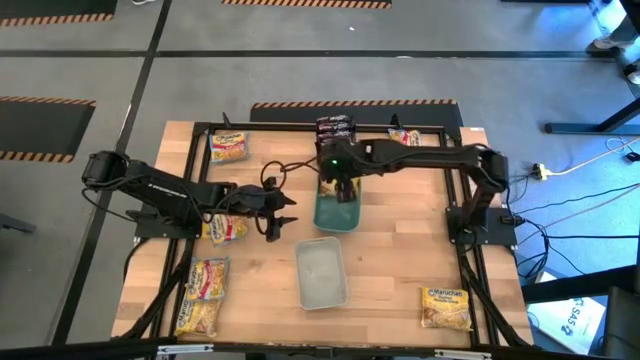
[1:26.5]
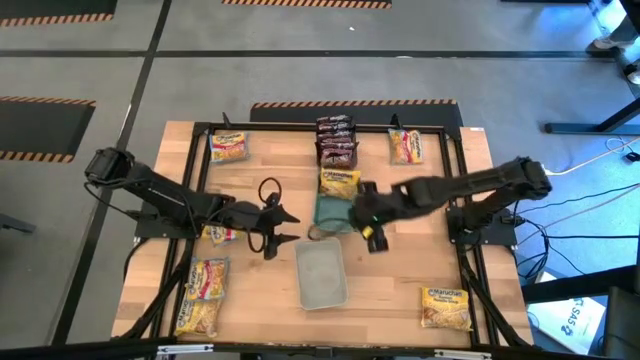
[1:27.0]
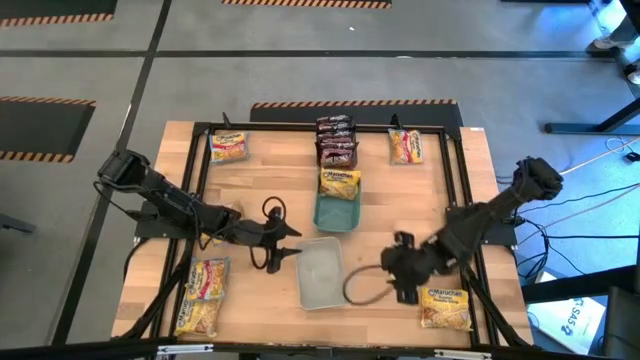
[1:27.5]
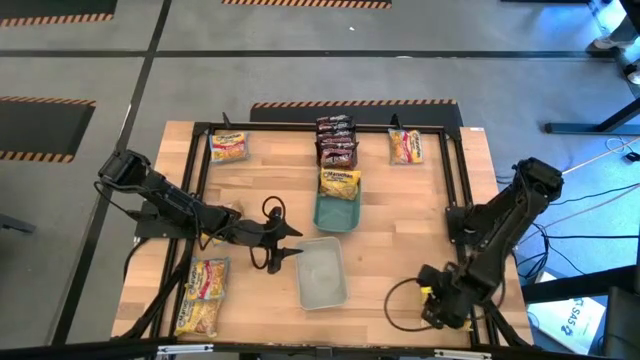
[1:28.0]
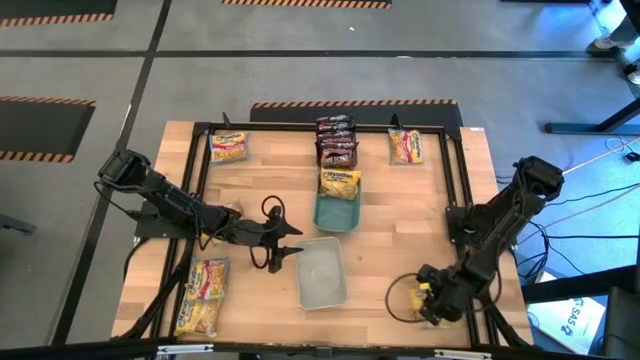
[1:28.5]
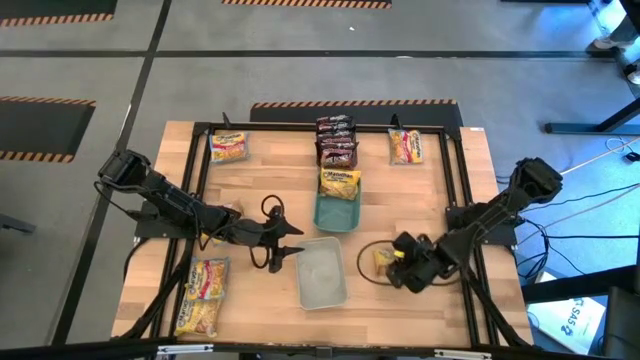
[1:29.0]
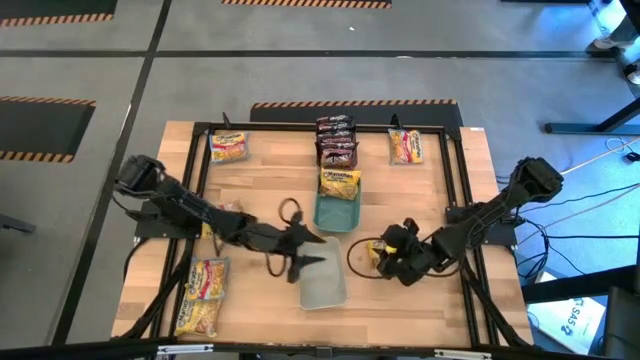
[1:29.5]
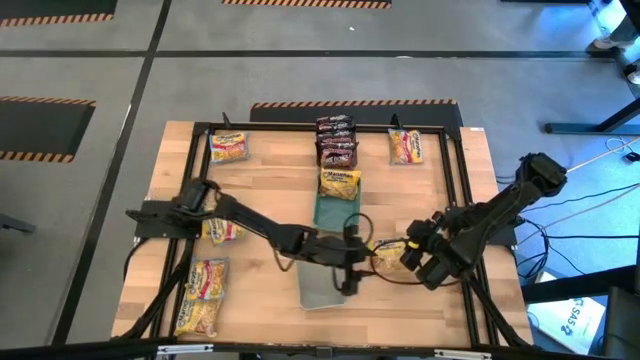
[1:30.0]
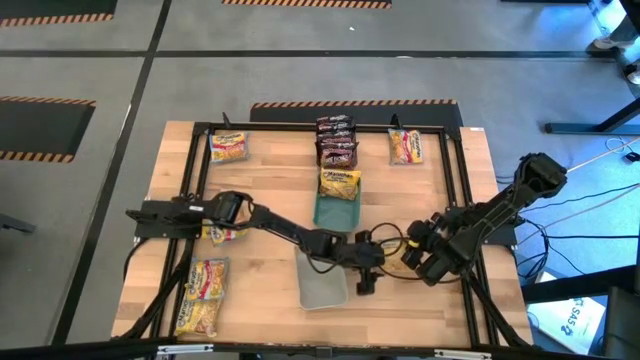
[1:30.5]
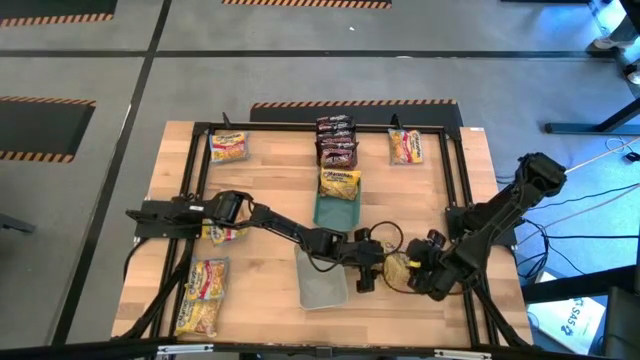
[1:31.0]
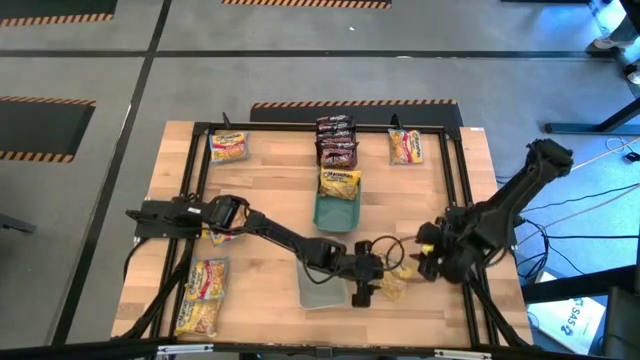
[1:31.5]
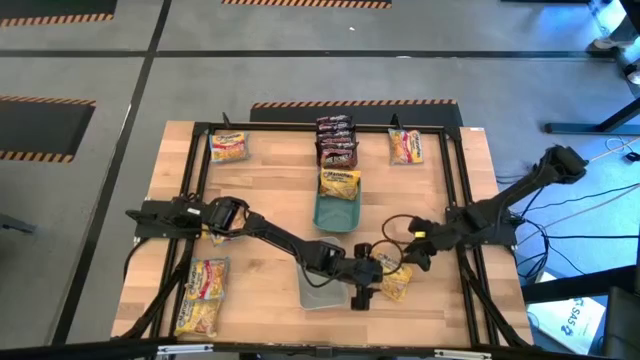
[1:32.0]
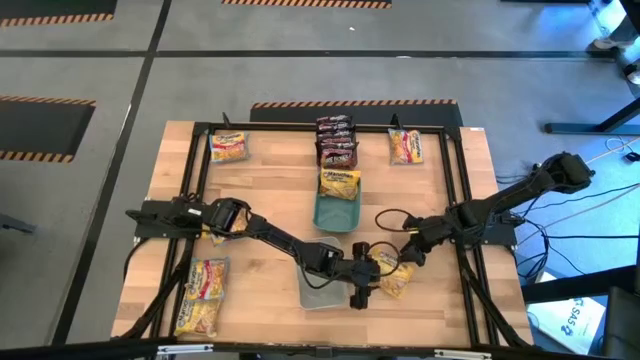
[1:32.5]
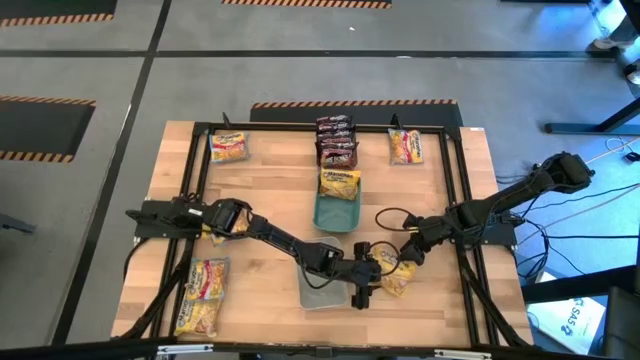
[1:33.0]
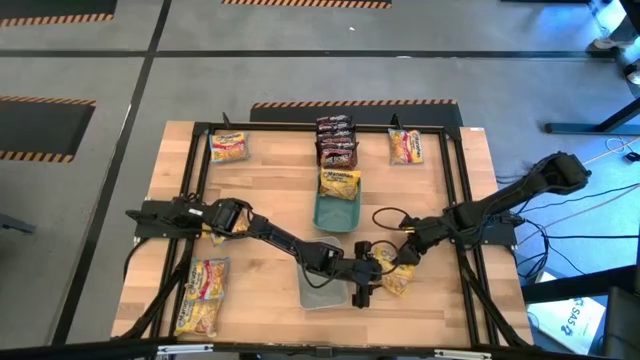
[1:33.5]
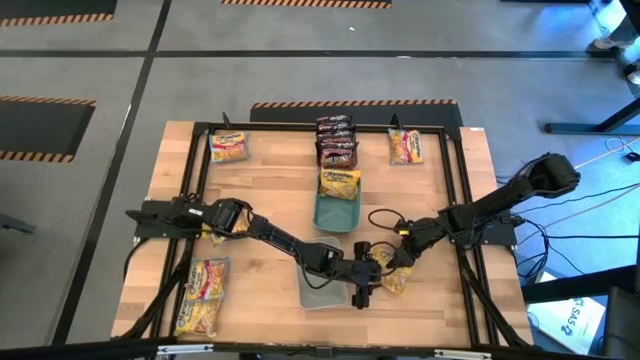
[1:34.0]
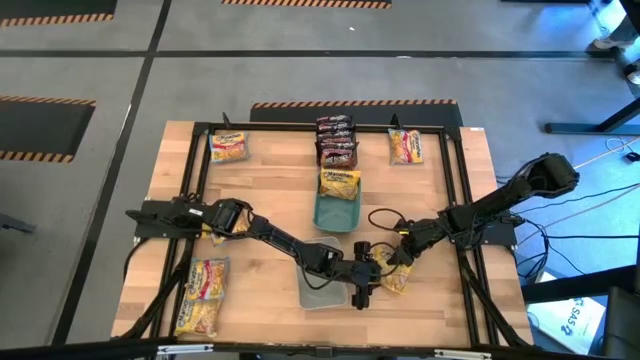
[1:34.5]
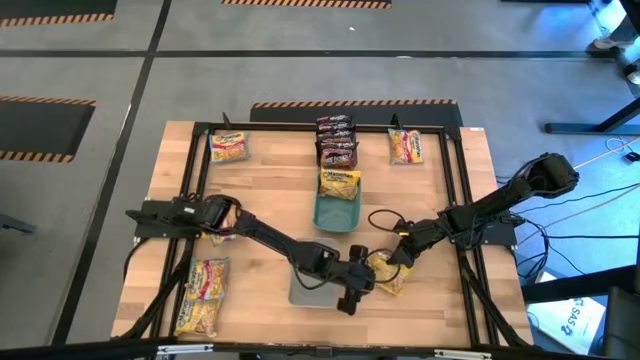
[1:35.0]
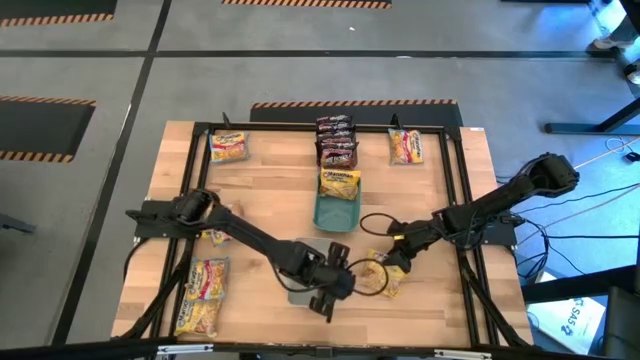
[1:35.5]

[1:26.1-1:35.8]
Task: Sort Maruchan noodles
Put the yellow noodle pack into the green bin

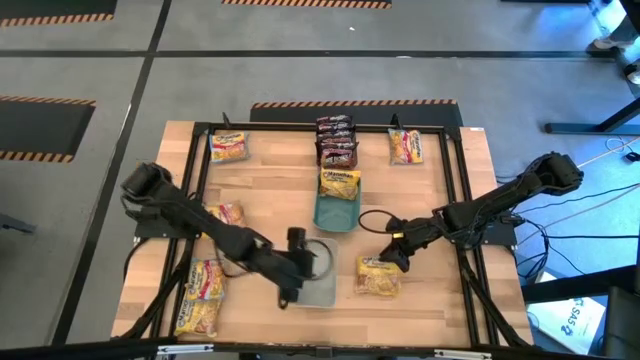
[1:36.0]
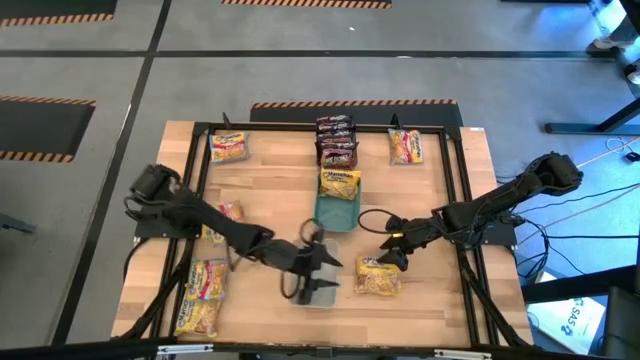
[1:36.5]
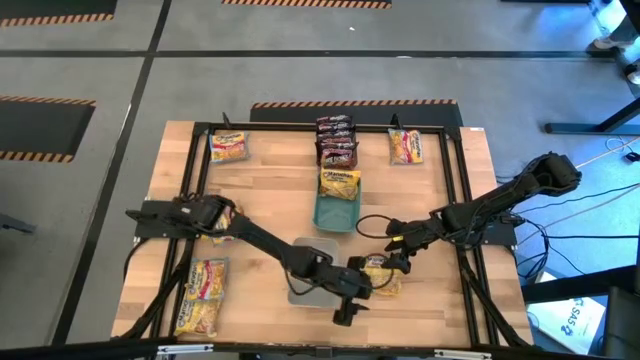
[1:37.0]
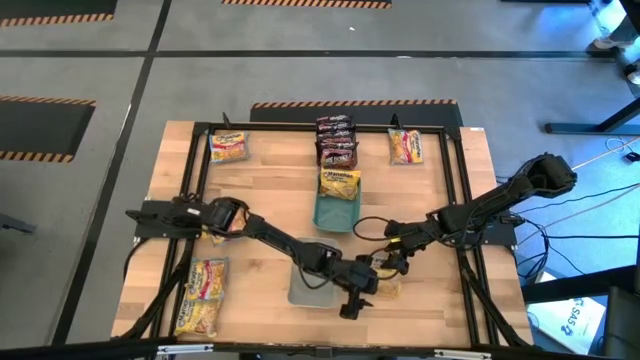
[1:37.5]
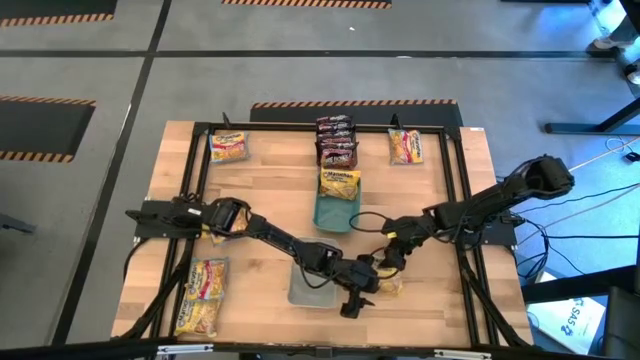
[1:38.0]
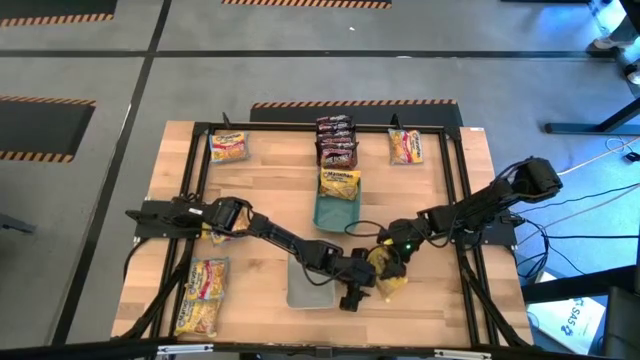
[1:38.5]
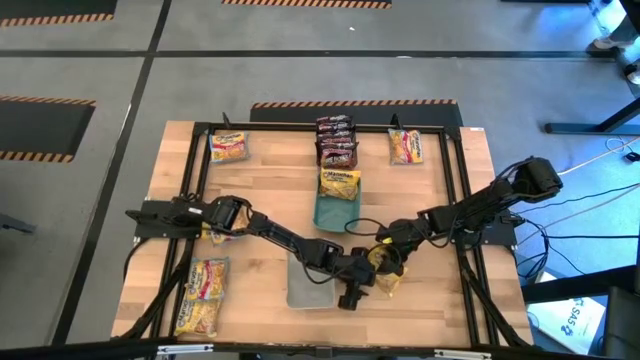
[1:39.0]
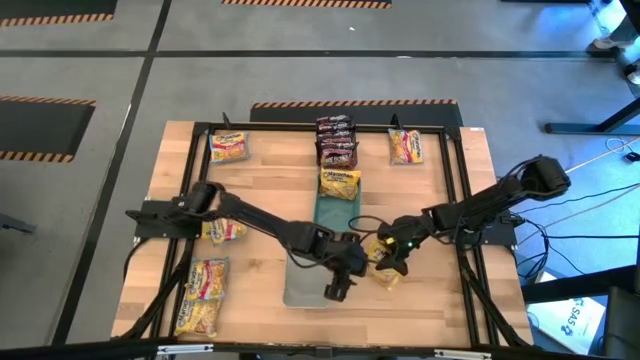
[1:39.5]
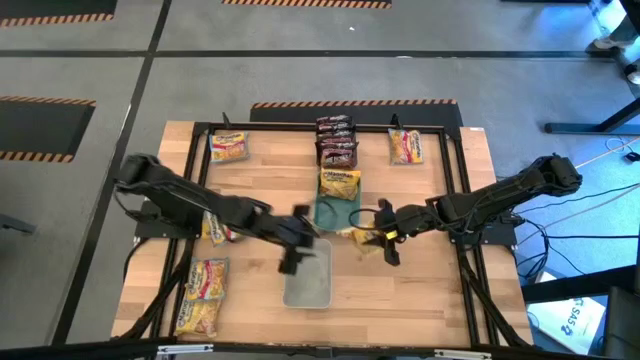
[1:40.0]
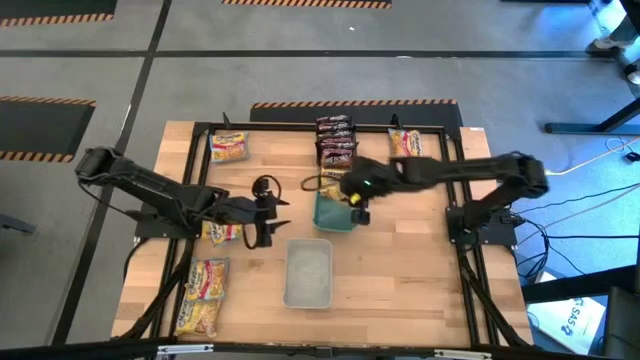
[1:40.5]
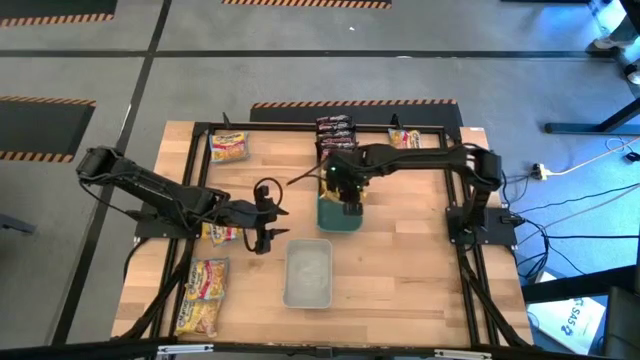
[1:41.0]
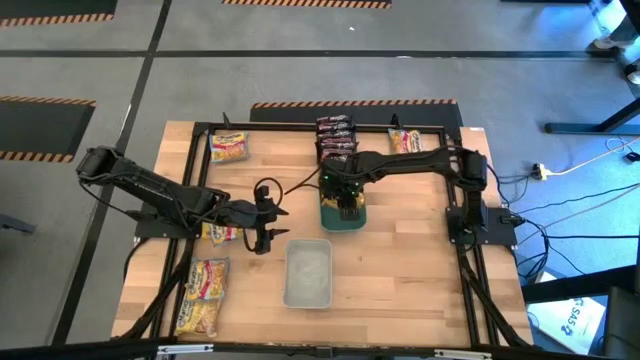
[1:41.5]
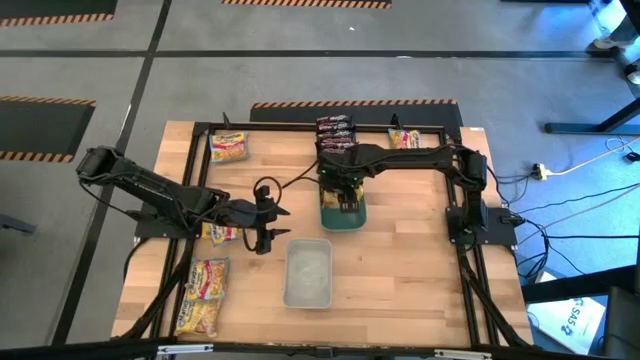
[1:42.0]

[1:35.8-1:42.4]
Put the yellow noodle pack into the green bin
